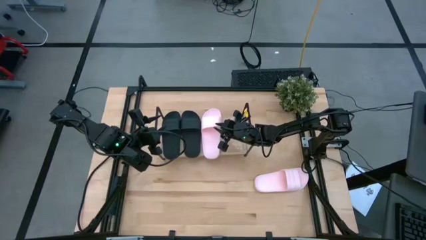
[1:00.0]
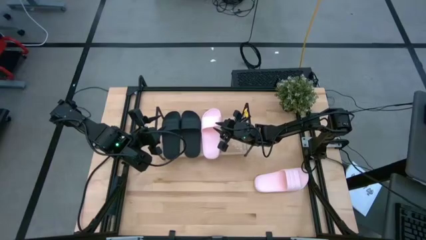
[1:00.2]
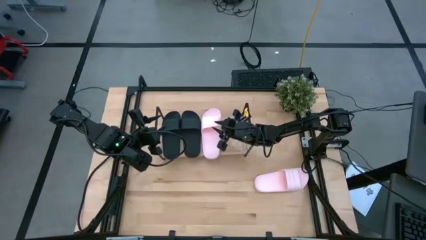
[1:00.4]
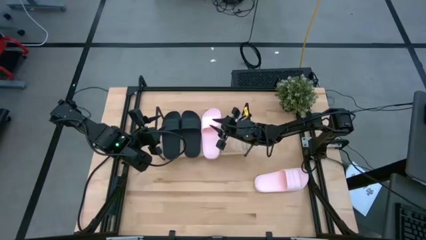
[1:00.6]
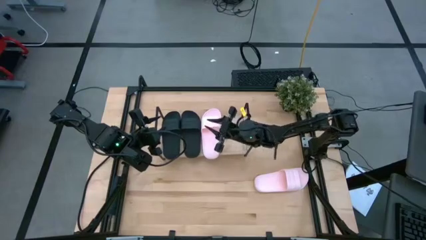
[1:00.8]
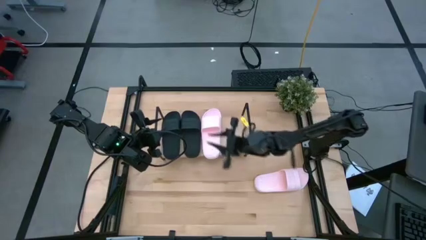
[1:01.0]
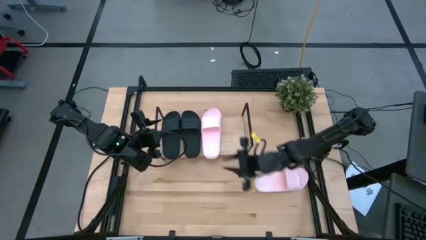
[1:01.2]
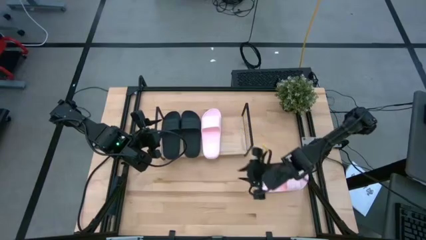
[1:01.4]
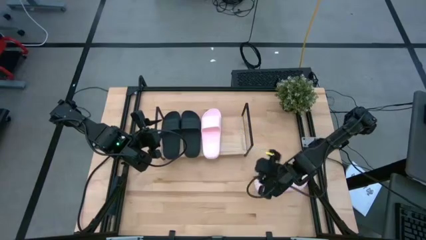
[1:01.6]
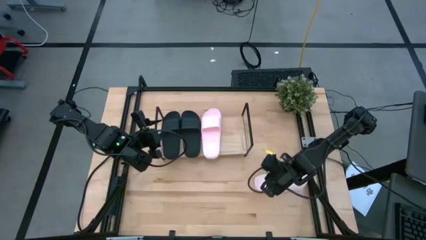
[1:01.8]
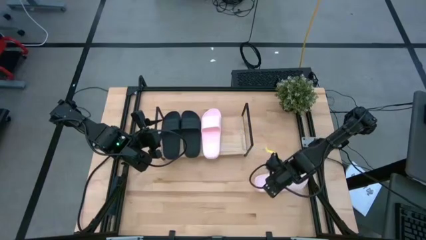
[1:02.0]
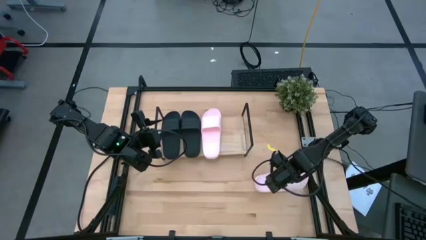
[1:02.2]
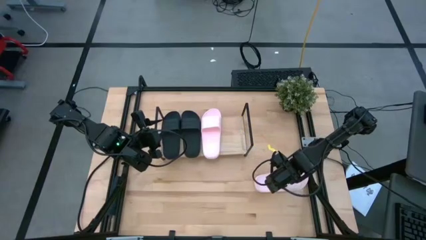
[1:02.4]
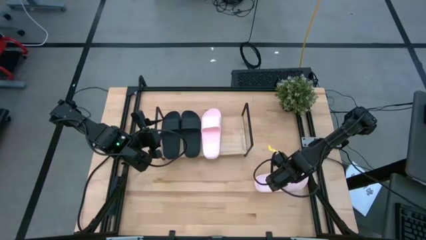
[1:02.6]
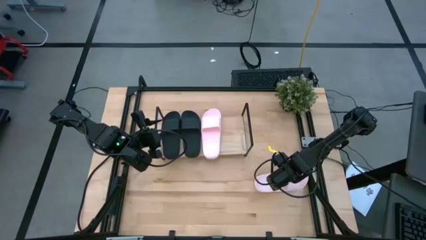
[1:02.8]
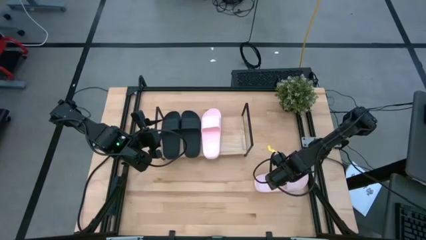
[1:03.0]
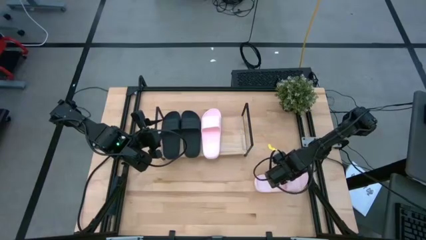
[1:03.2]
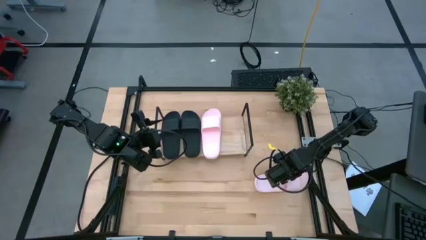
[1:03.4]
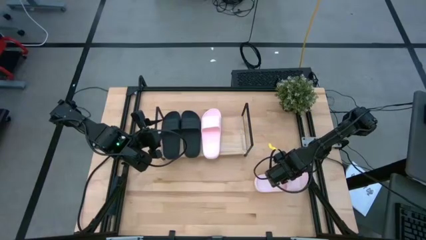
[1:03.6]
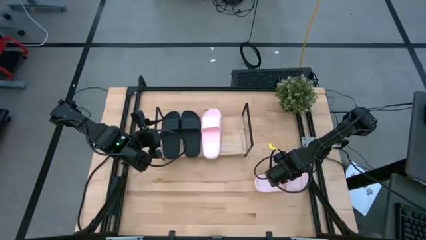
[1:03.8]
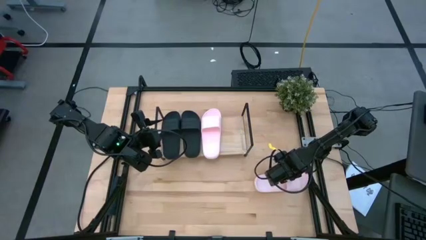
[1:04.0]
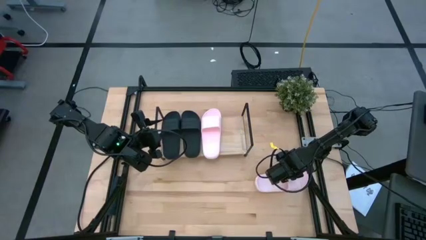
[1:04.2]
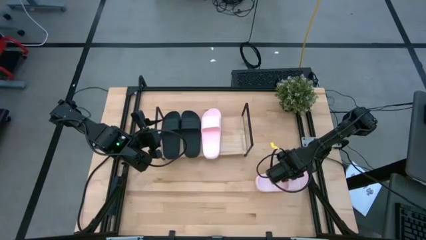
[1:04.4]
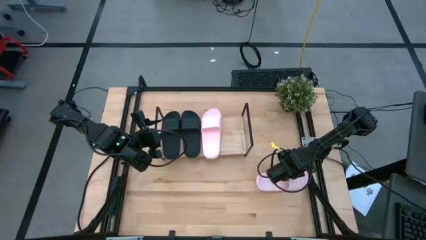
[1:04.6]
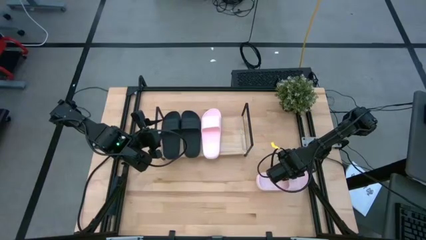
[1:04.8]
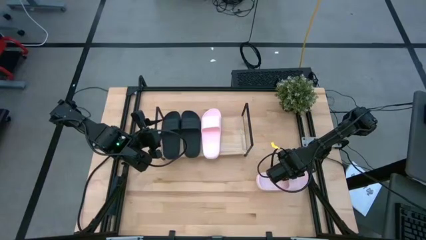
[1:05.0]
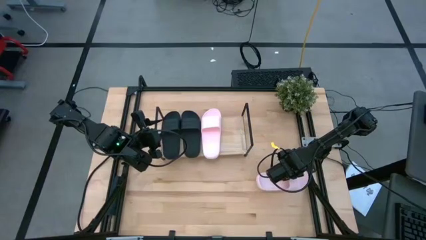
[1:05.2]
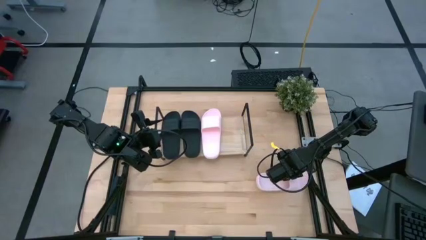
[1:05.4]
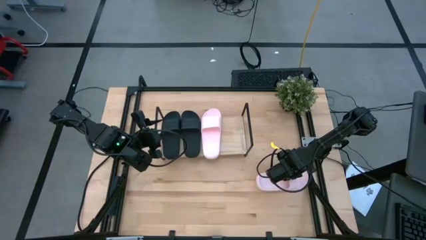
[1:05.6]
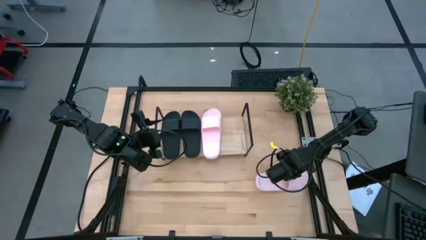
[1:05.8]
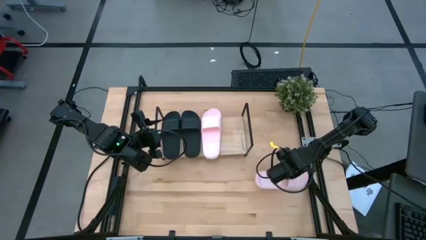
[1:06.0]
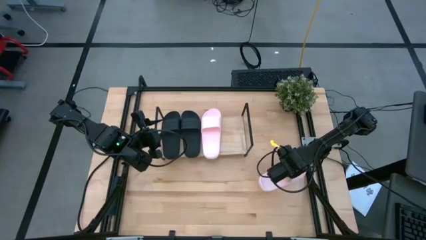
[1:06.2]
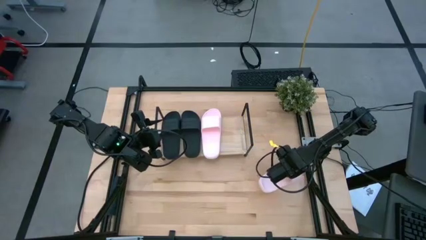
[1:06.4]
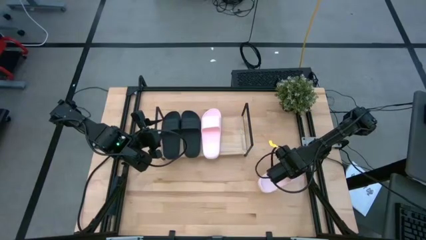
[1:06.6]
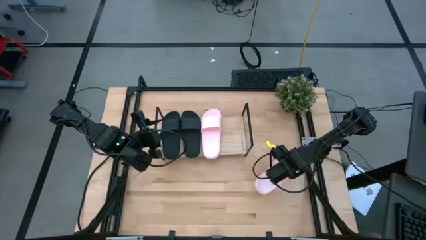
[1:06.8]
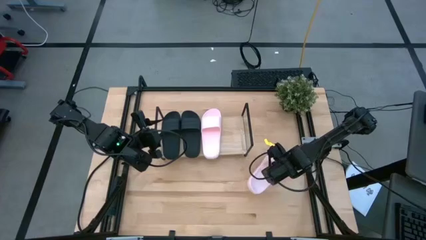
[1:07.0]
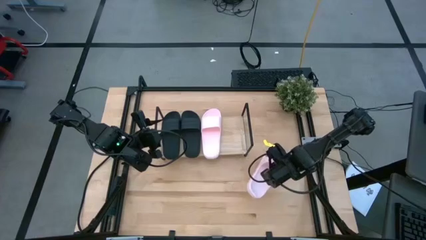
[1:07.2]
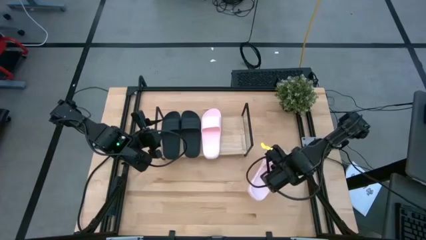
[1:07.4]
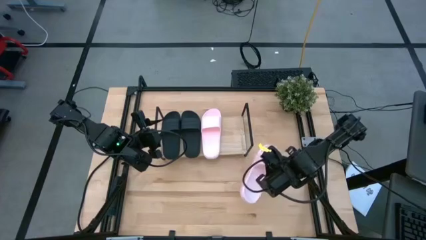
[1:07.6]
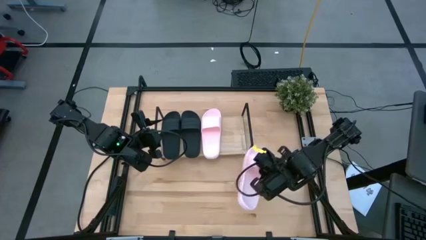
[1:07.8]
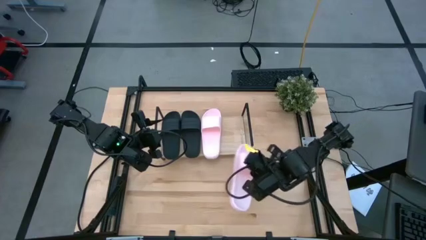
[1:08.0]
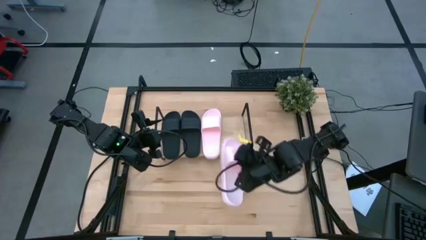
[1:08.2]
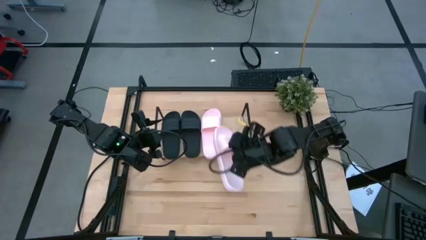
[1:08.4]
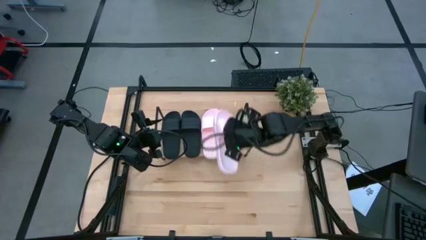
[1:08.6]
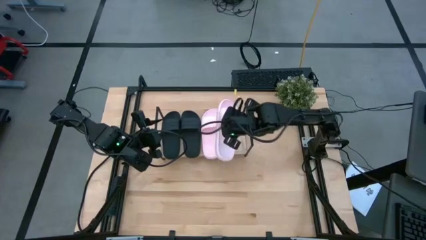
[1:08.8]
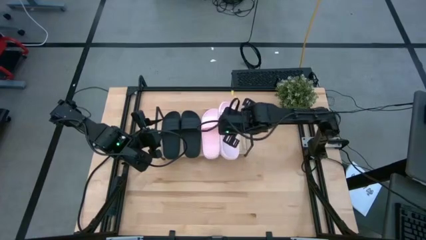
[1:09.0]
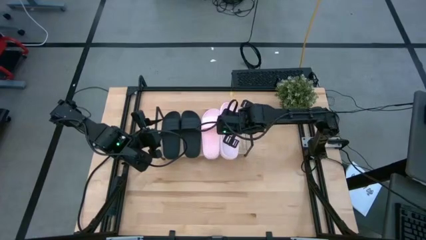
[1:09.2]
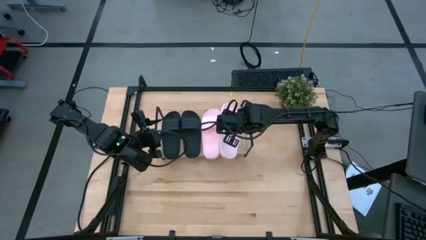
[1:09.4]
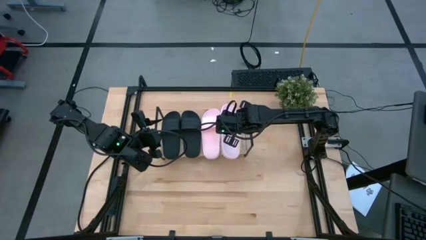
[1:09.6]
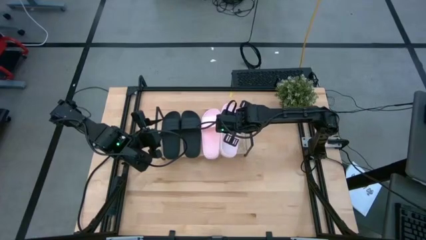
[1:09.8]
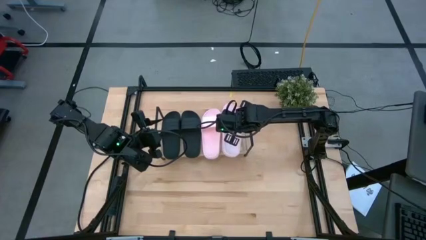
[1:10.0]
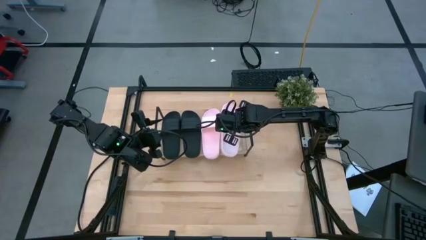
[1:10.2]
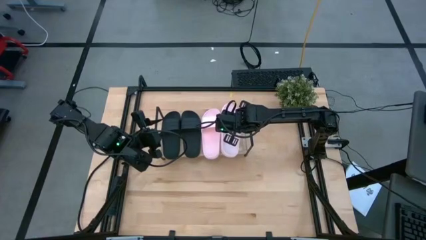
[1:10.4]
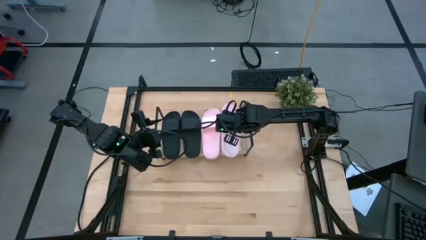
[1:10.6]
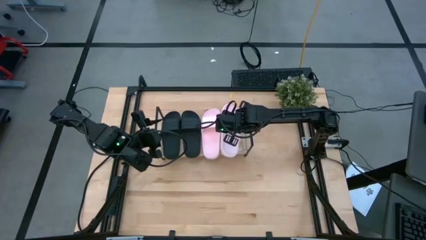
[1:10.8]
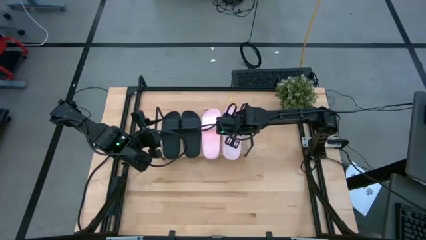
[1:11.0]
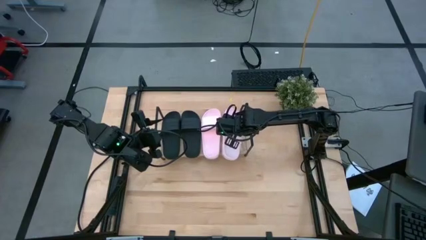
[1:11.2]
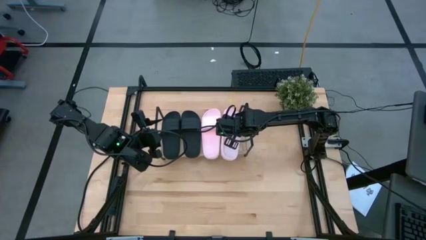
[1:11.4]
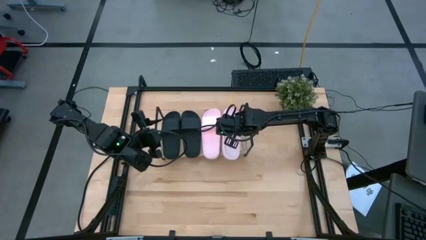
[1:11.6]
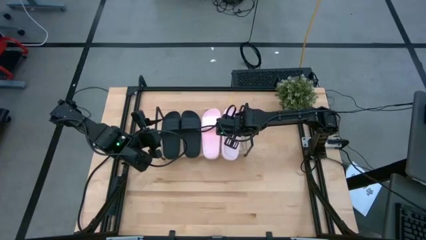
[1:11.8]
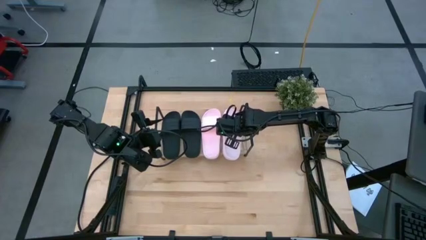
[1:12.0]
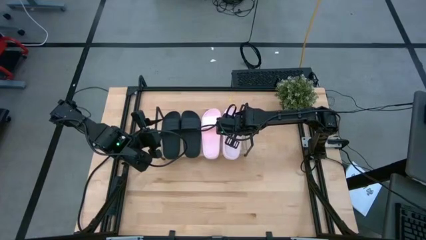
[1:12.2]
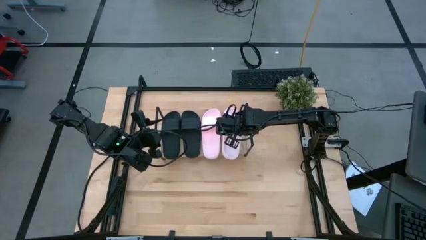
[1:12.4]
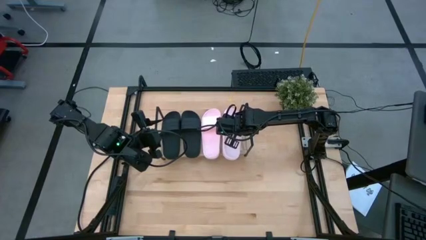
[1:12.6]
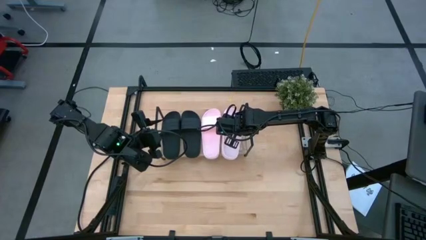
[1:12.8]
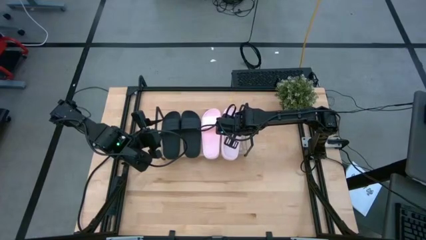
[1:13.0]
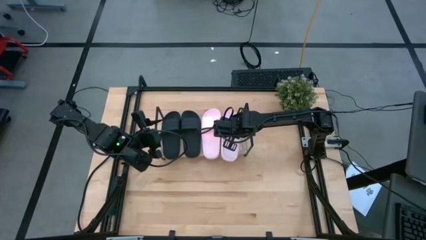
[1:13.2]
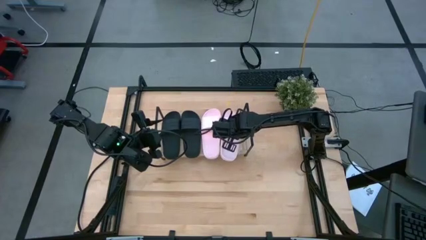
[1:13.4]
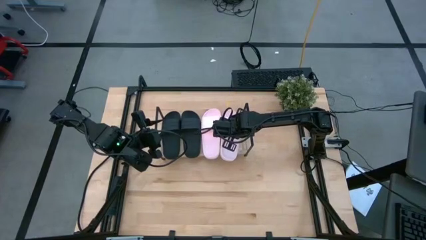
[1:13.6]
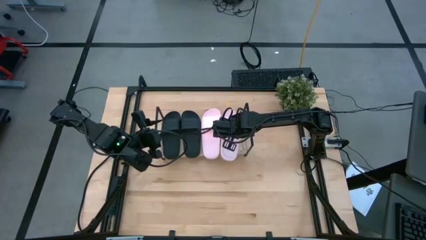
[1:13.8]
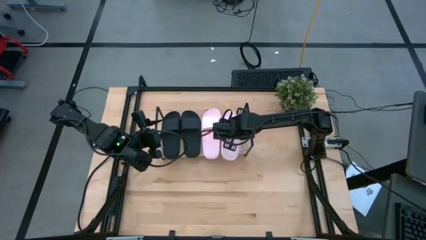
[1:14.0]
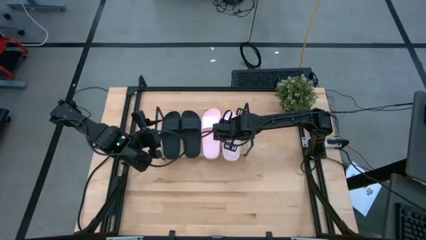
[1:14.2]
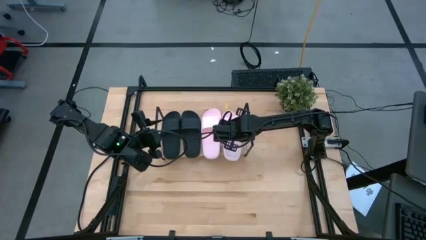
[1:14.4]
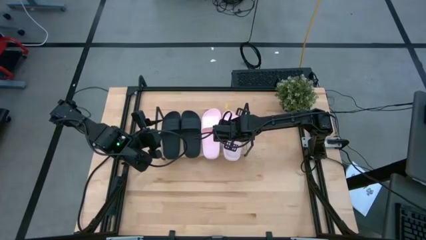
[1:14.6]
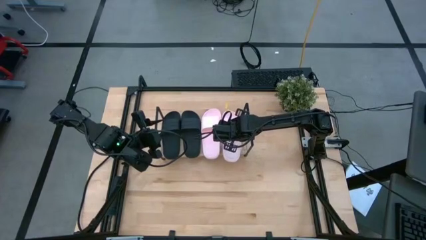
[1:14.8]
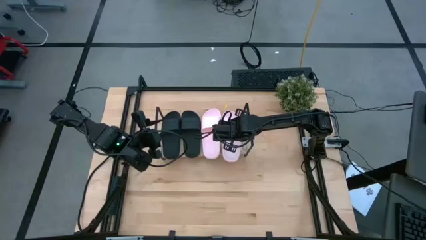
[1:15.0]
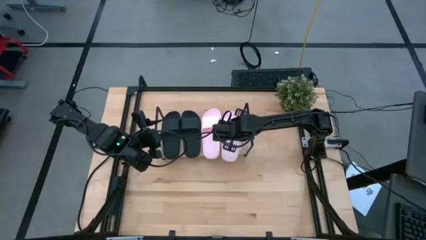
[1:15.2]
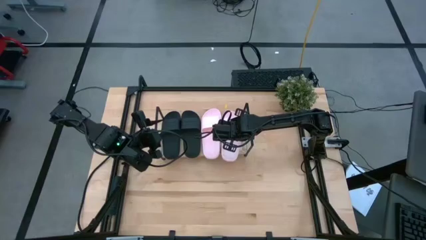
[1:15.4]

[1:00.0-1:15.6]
Task: Pick and place slides into the shelf
Put the pink slipper on the shelf
